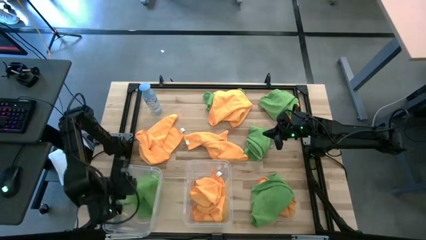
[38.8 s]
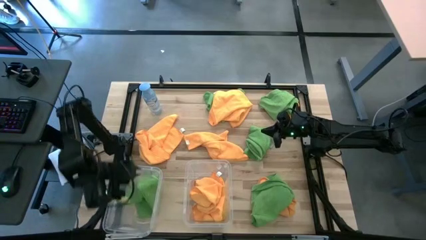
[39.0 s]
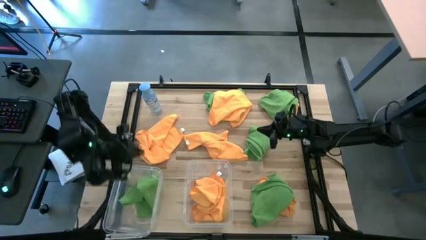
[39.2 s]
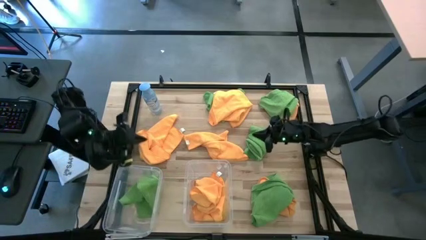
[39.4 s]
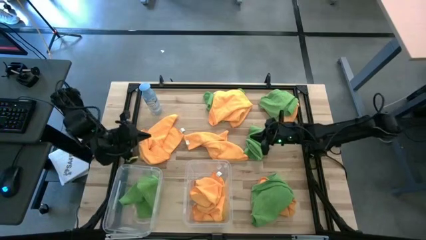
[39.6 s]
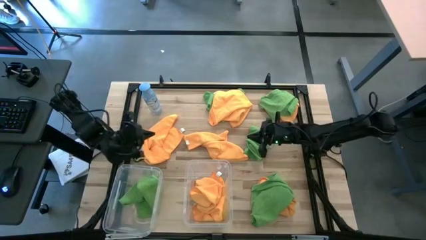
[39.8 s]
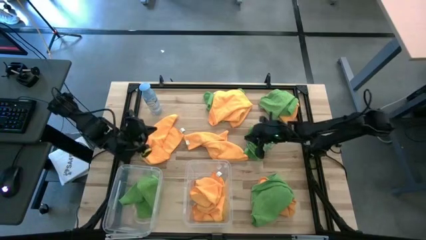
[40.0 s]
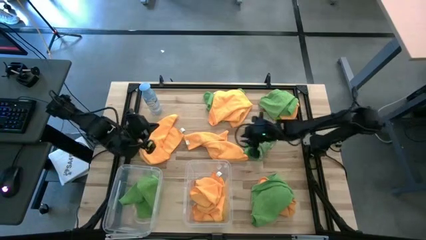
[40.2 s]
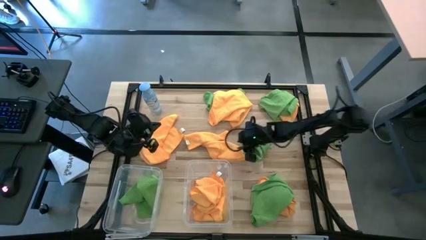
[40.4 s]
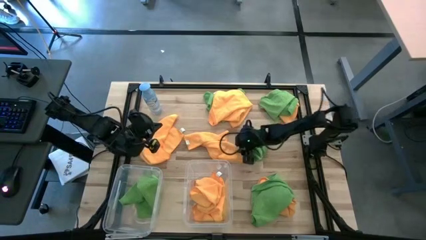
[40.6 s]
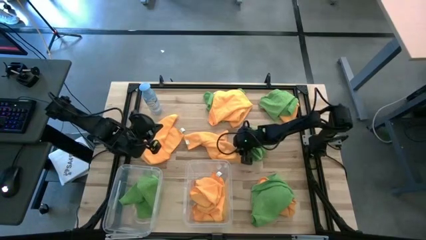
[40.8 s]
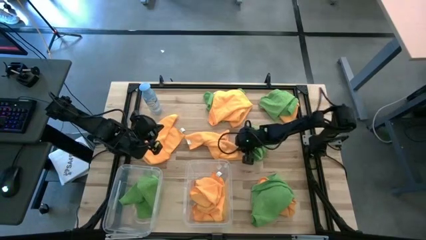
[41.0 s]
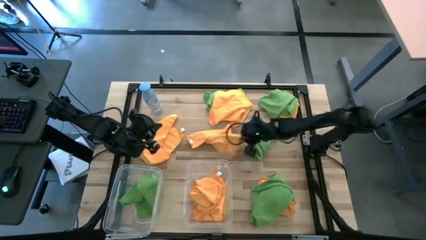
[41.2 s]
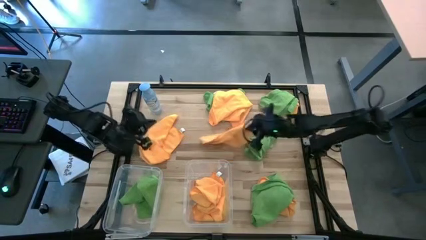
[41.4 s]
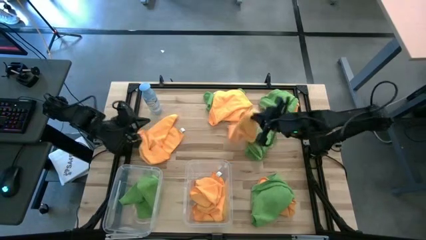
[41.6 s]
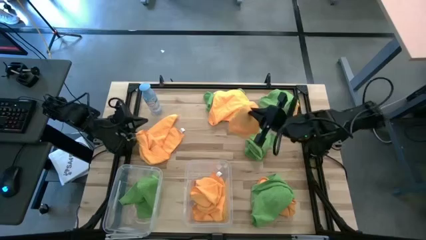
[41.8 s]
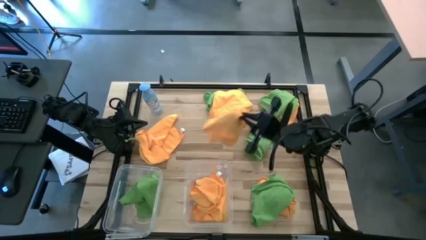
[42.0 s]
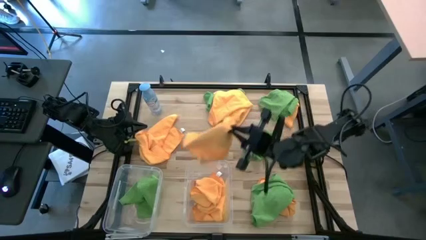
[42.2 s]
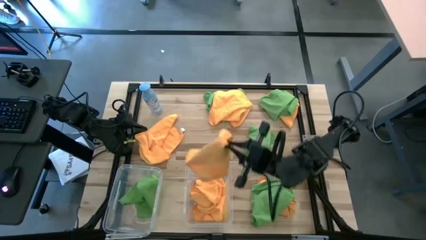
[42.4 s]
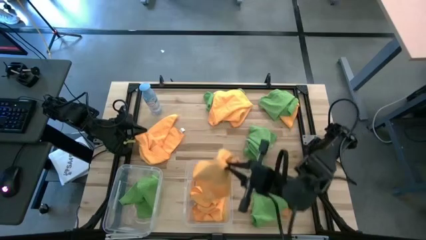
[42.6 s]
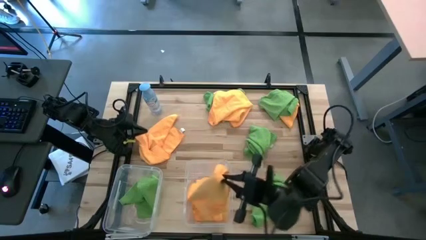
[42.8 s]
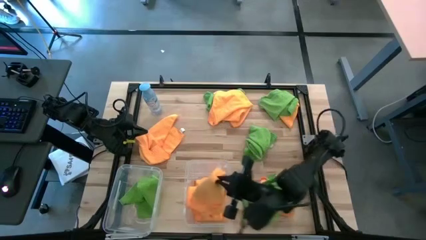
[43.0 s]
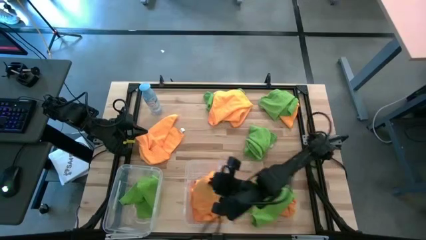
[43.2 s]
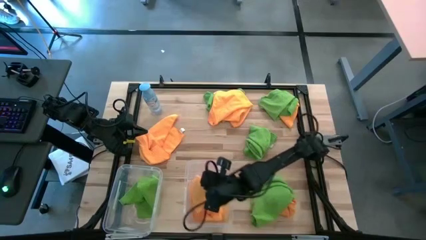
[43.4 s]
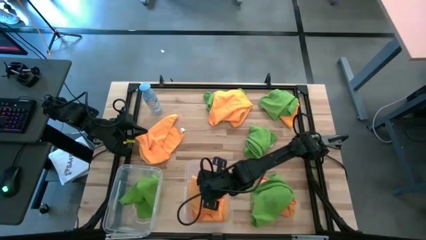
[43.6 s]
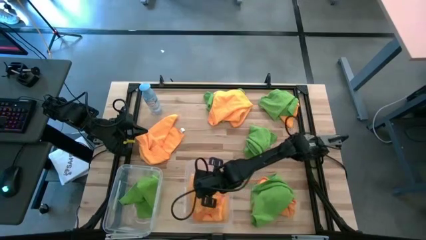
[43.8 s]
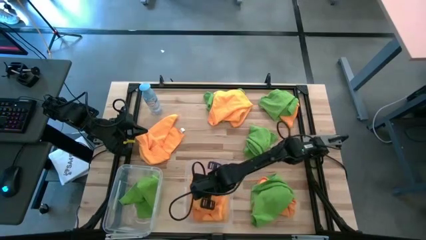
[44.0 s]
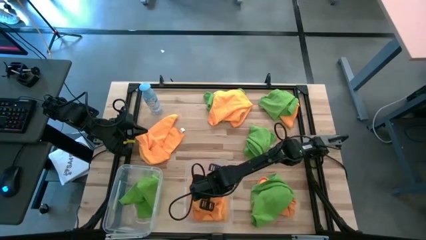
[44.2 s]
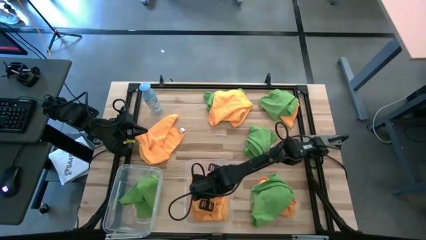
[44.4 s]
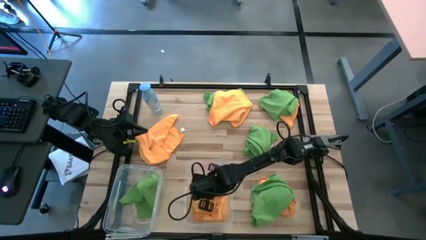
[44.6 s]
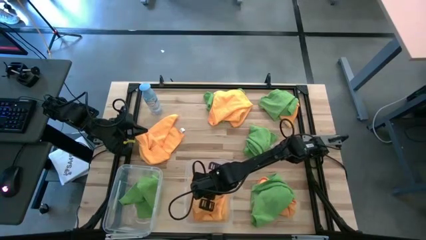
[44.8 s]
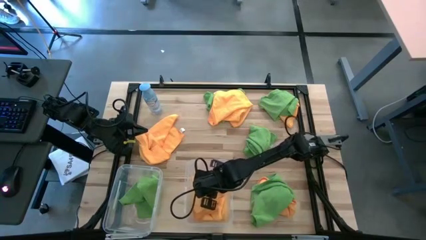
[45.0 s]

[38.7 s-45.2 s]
Task: Sort microfiber towel by color & place in baskets
Put the orange towel into the right transparent bin

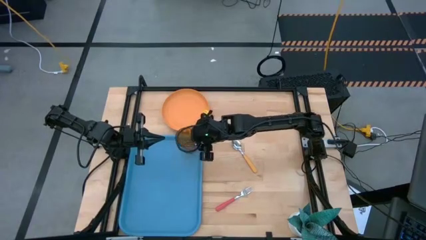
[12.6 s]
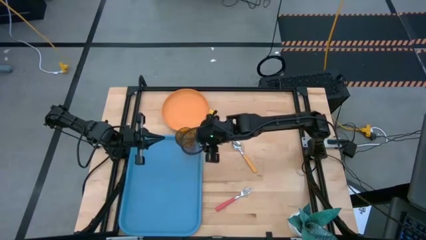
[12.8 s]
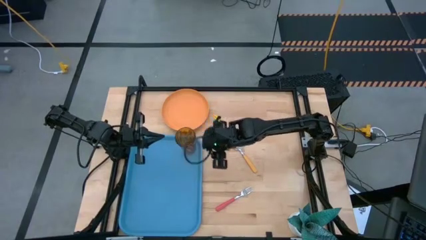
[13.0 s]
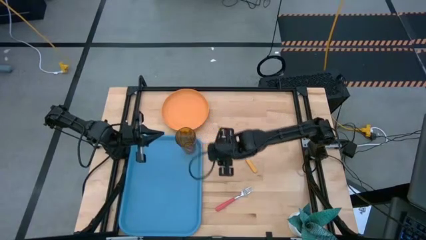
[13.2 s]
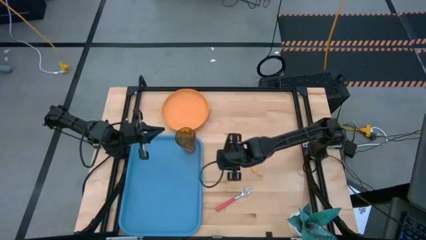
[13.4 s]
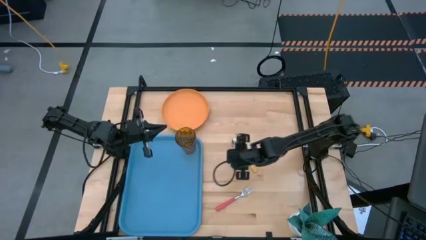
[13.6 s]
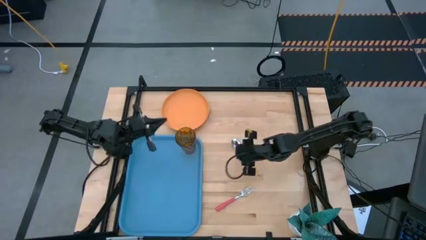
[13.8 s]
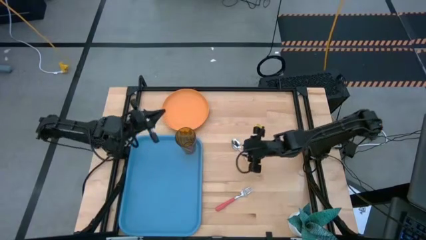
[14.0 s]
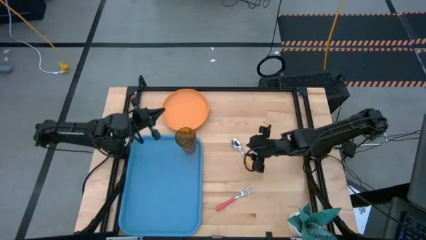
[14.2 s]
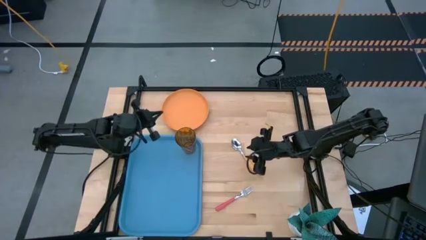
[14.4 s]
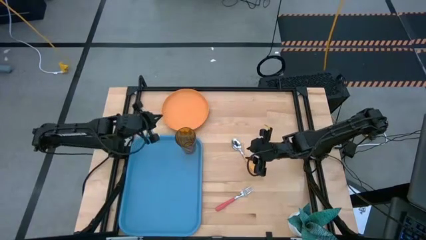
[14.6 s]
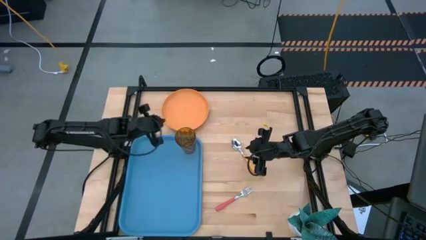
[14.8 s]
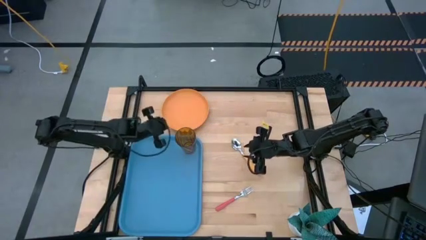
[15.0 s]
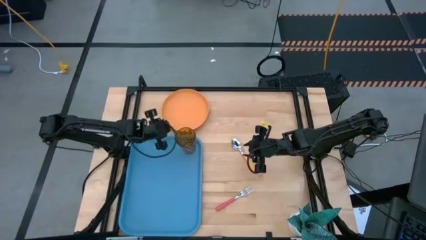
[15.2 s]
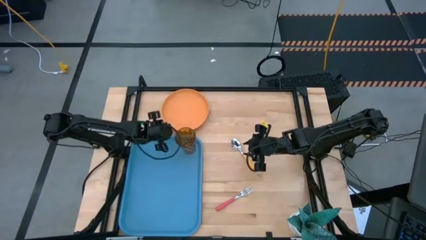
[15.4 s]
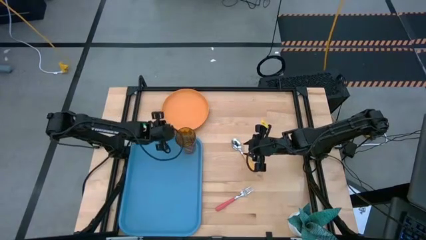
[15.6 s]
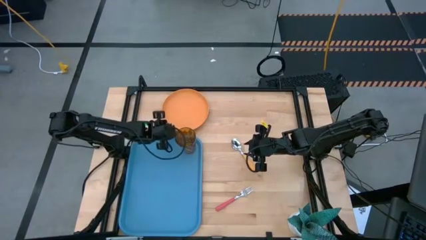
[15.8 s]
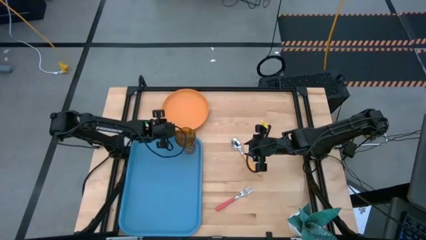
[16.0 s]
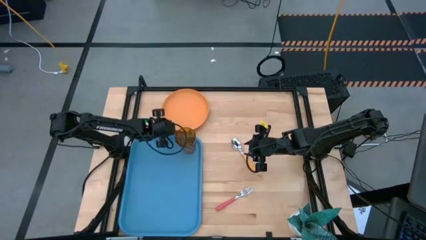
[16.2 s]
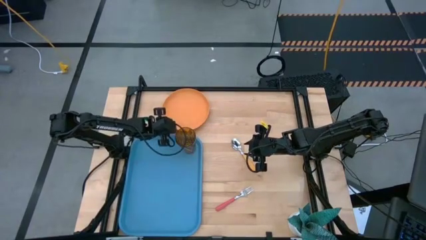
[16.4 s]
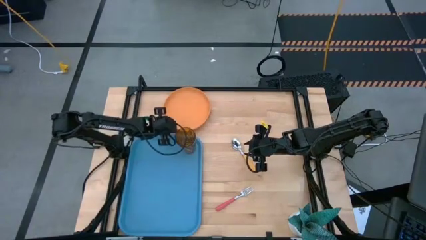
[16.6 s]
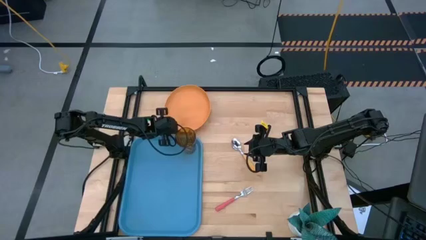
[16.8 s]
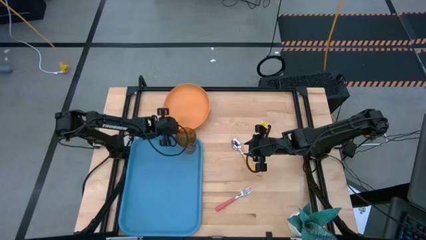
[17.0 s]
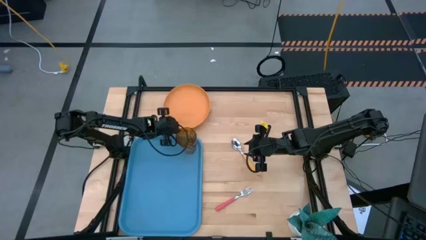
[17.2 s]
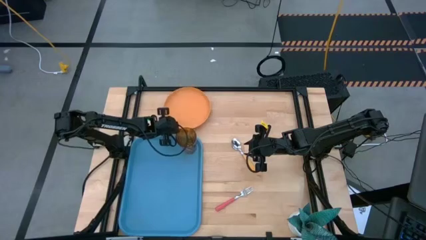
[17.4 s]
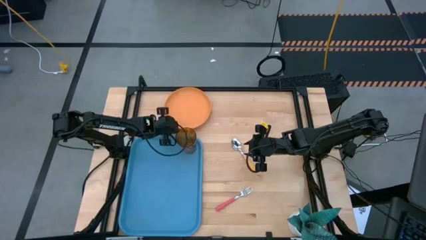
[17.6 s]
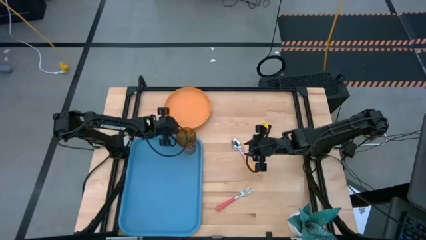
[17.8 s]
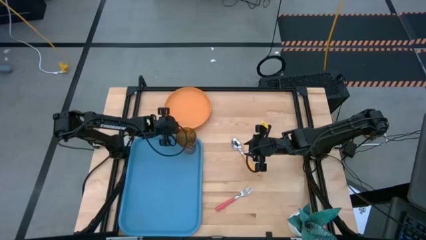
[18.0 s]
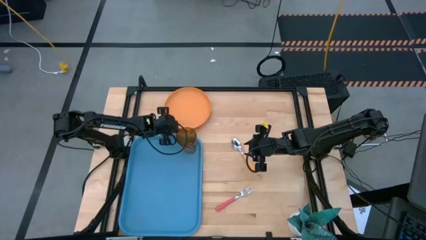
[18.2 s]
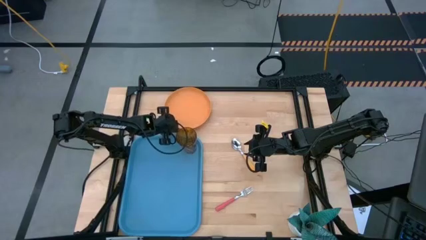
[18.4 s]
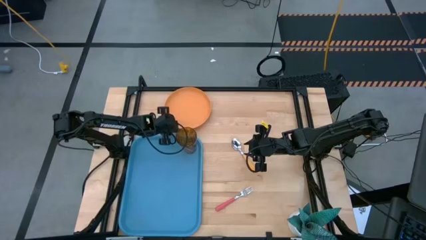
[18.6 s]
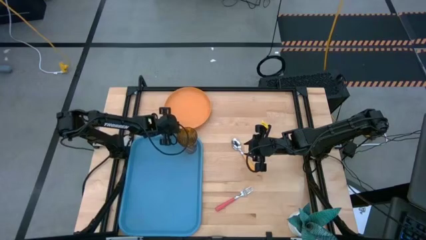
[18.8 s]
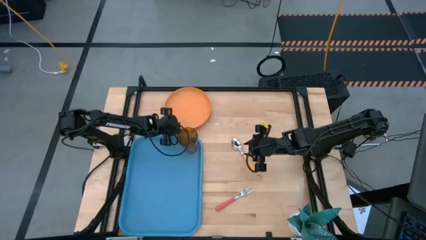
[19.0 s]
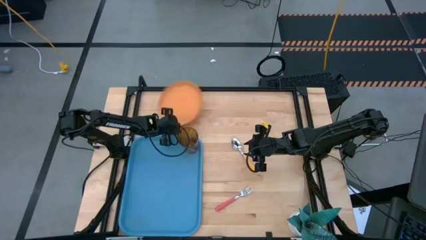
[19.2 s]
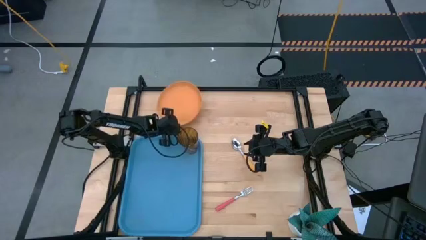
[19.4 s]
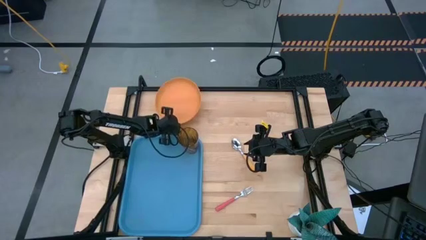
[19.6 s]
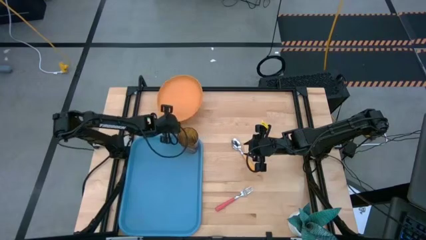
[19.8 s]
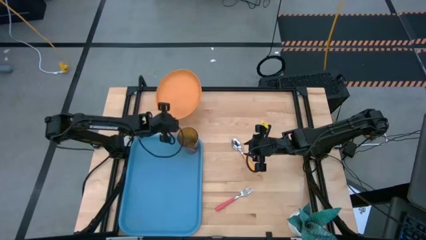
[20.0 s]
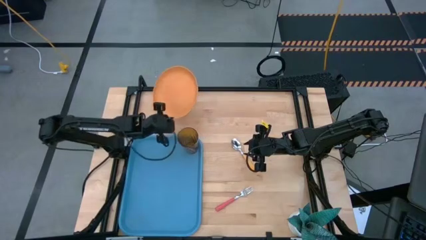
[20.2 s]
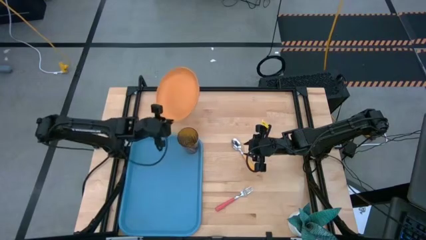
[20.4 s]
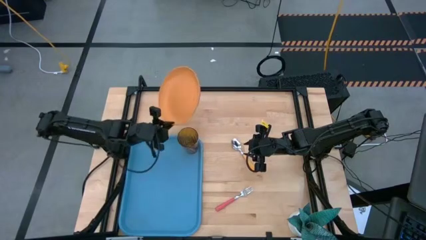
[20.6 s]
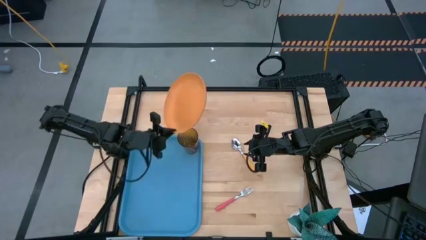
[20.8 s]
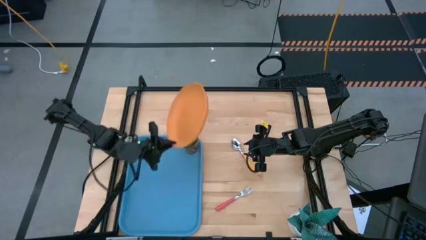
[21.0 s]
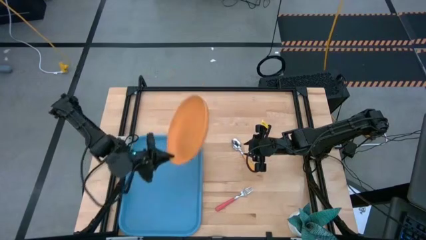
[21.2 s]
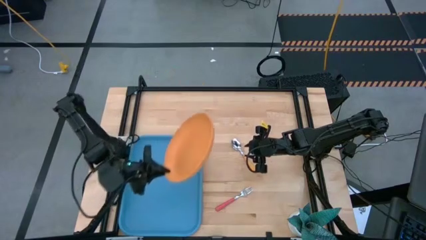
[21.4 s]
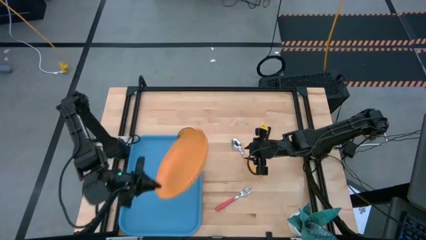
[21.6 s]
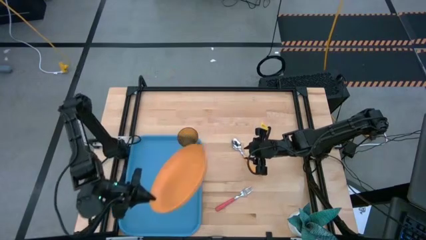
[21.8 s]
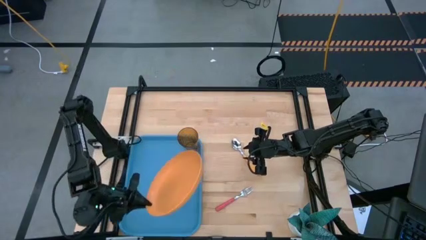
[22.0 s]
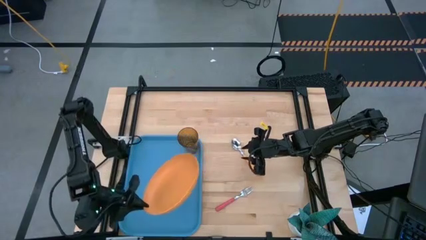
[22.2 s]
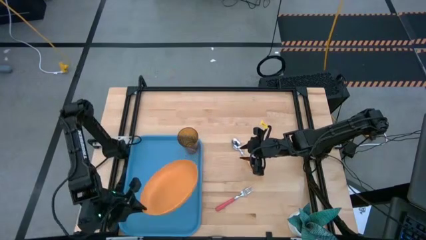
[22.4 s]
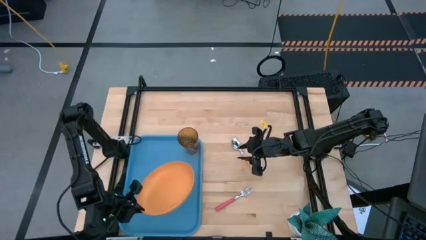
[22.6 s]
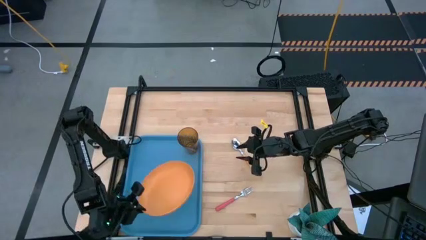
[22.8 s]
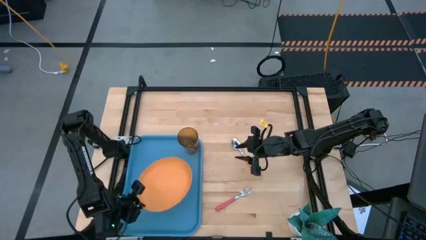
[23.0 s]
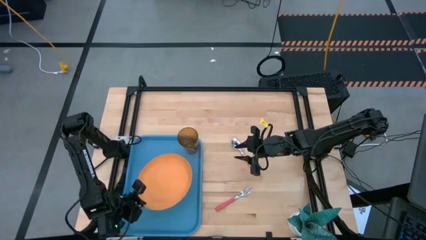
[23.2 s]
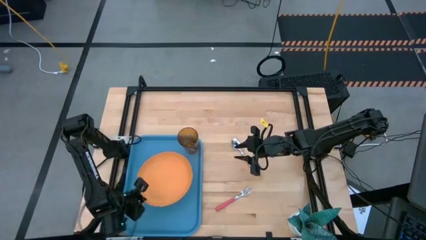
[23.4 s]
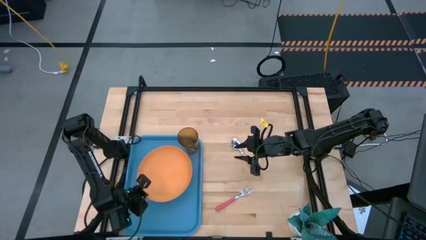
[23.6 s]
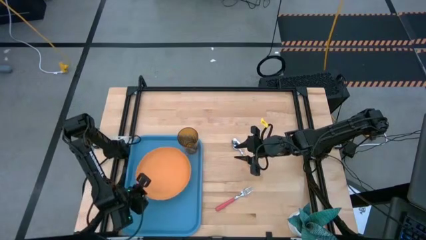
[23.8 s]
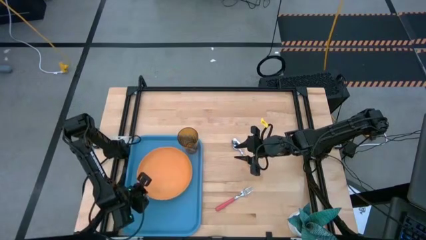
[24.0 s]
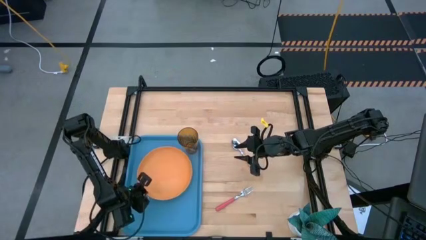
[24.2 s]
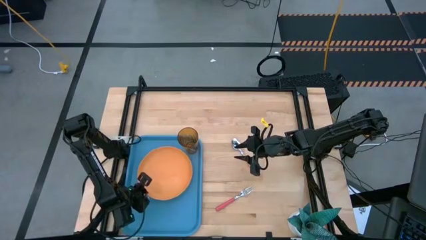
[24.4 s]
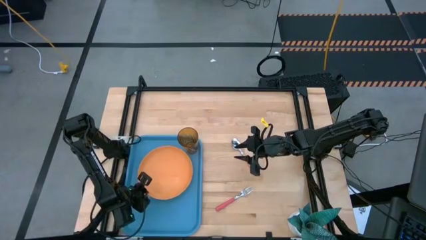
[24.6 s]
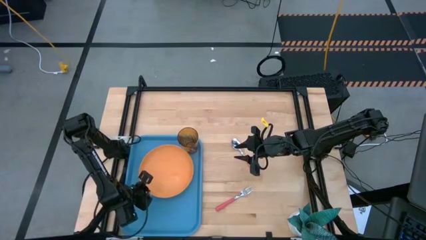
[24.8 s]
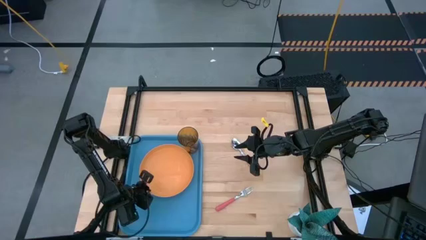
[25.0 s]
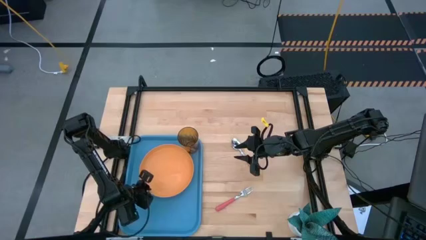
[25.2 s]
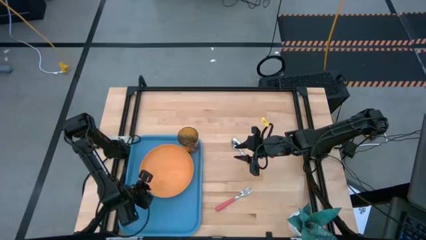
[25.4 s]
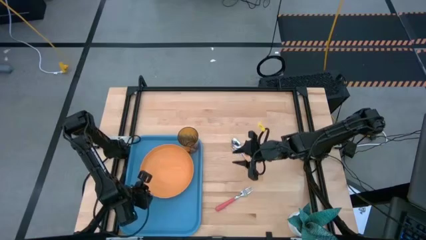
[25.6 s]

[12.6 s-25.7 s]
Task: Pick and place plate/cup/fork/spoon on tray
Put the orange plate on the blue tray
